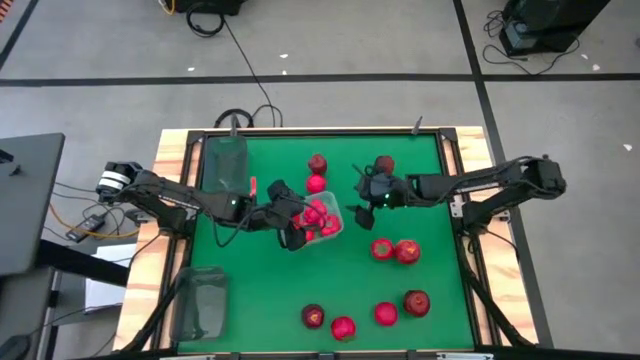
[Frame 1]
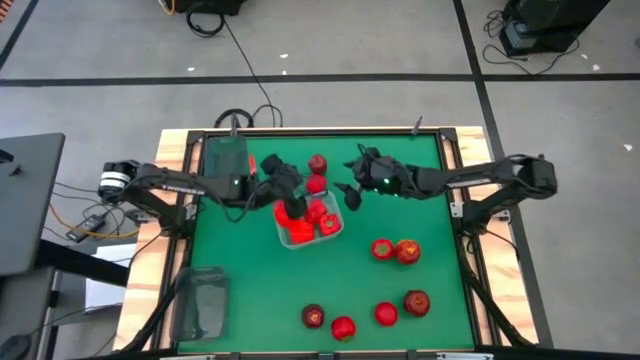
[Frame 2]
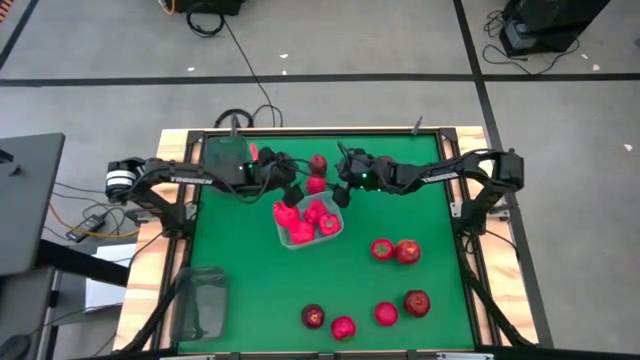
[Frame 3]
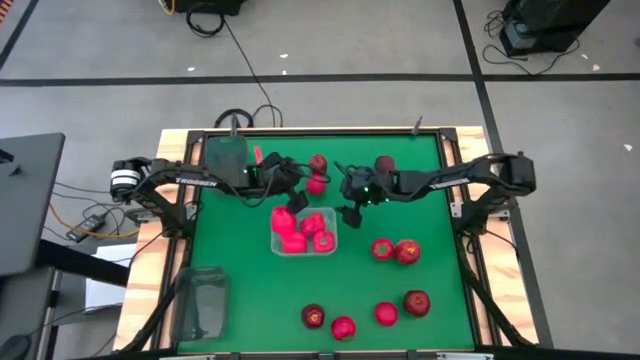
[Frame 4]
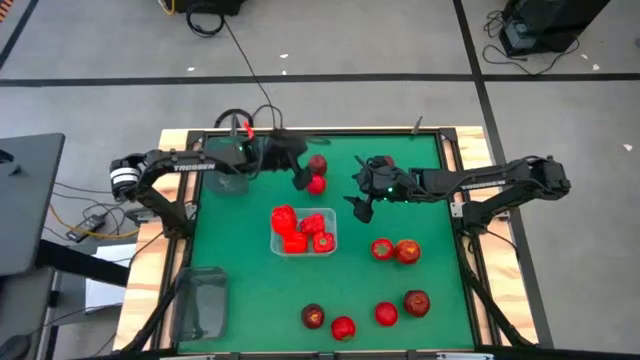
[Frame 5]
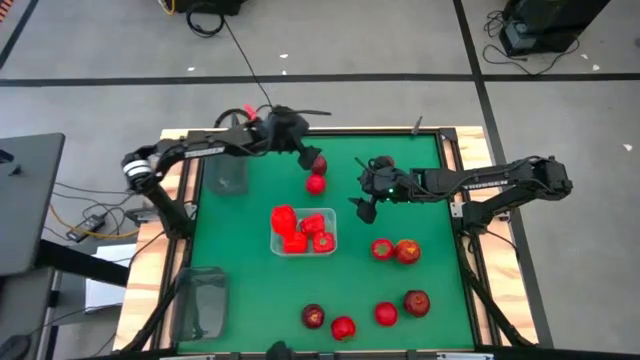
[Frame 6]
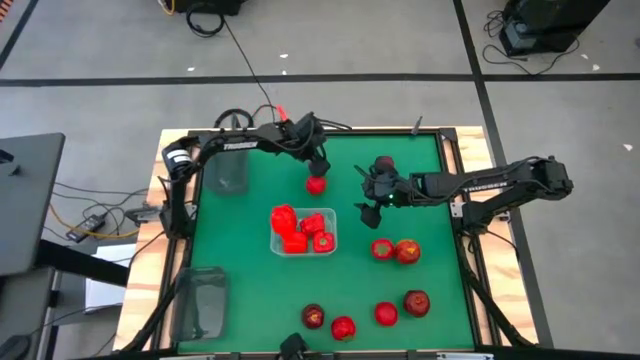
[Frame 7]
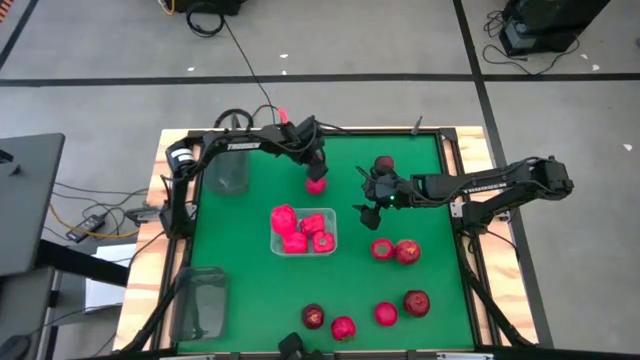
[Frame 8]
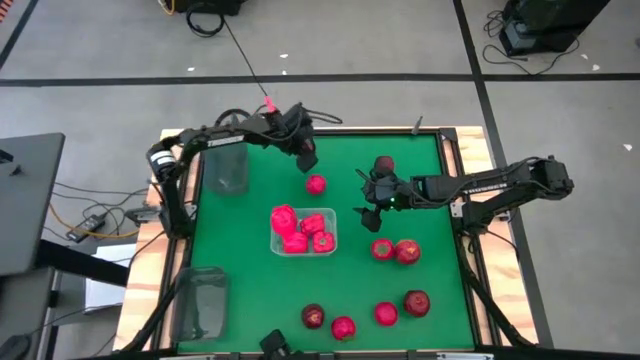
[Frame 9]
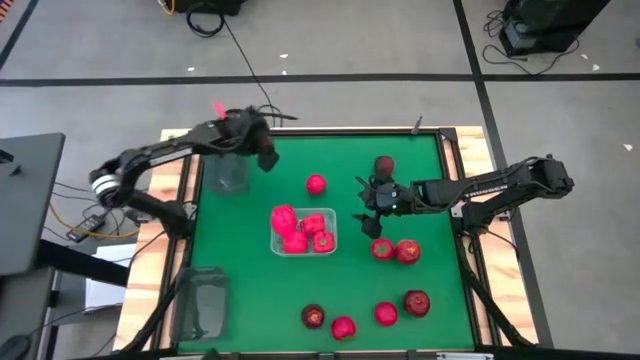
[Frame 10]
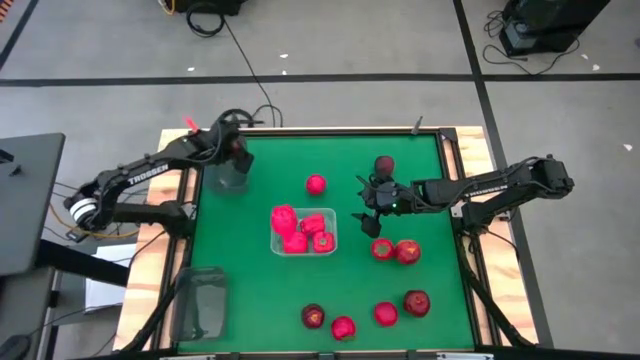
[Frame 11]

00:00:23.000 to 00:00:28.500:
Task: Sort produce into baskets
Put the red apple into the top black bin

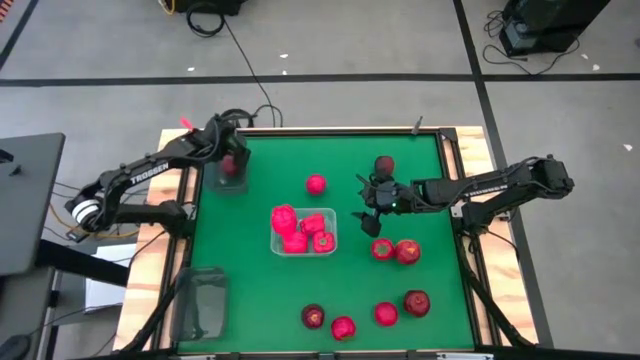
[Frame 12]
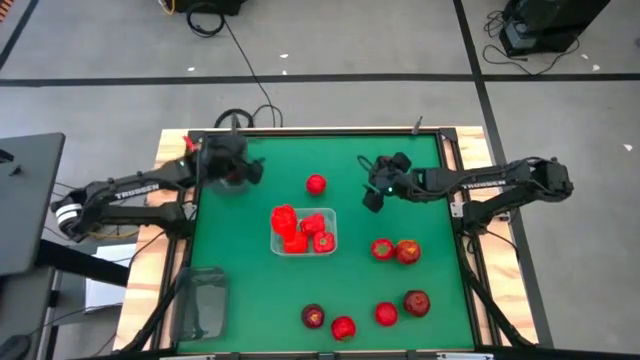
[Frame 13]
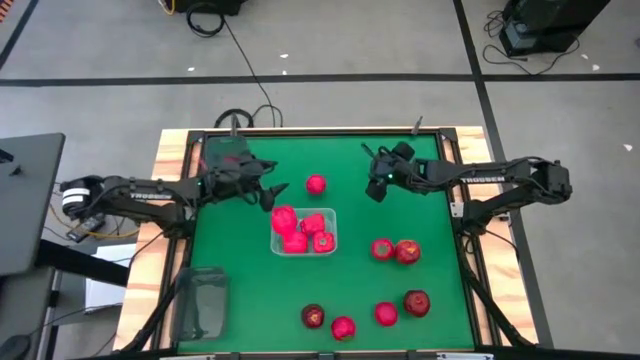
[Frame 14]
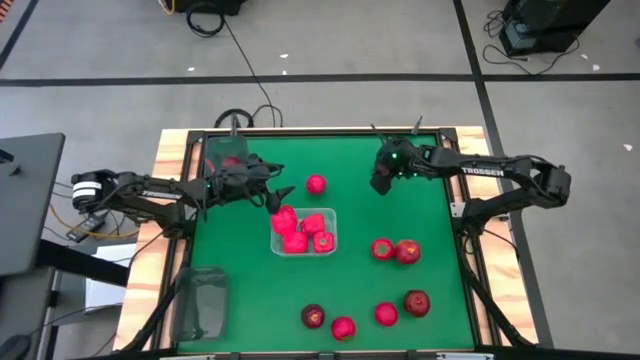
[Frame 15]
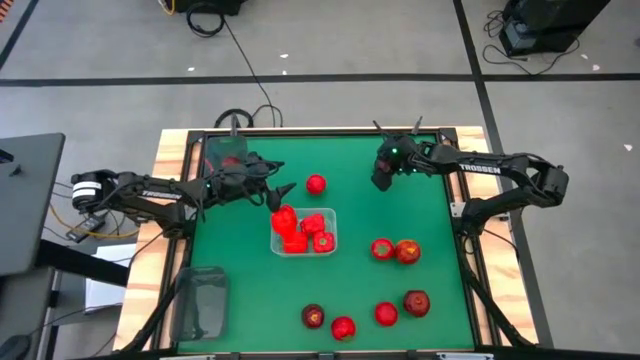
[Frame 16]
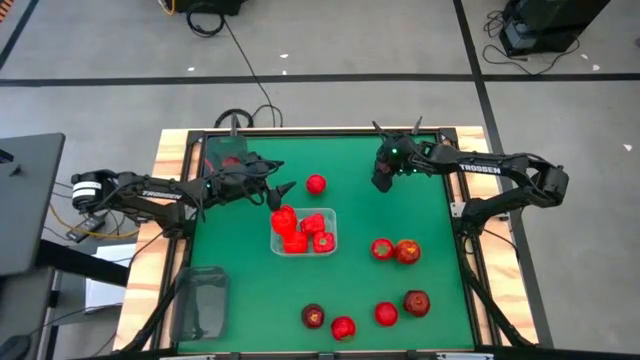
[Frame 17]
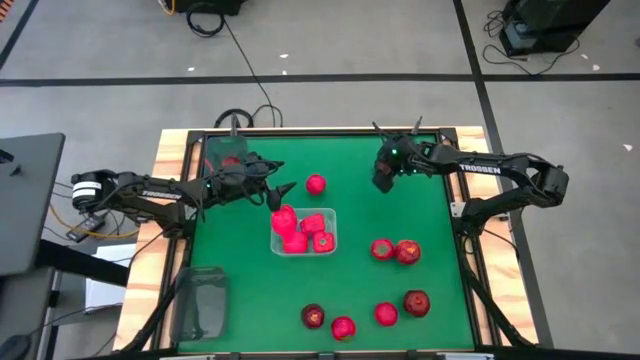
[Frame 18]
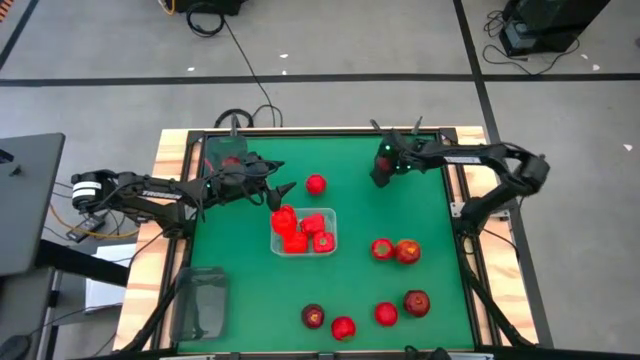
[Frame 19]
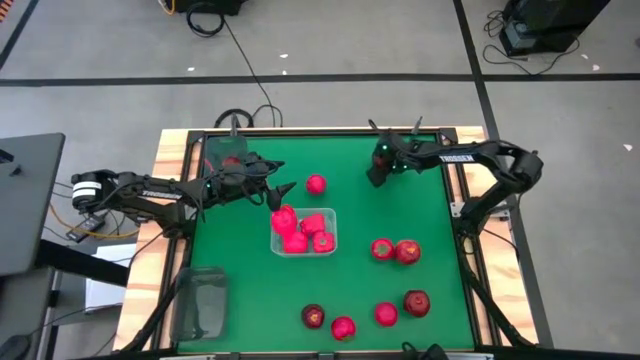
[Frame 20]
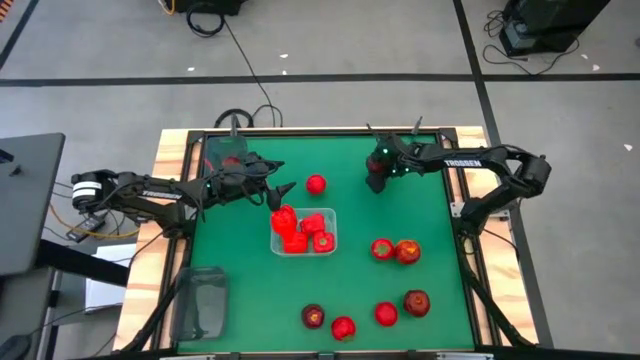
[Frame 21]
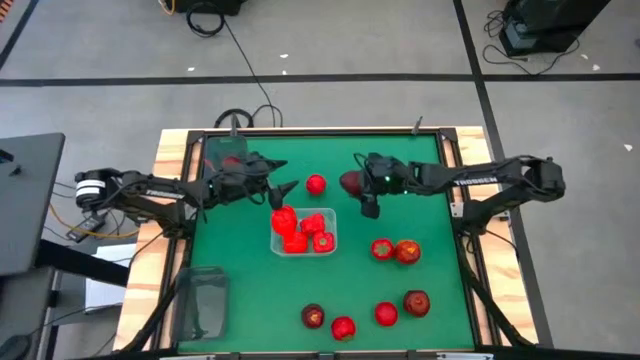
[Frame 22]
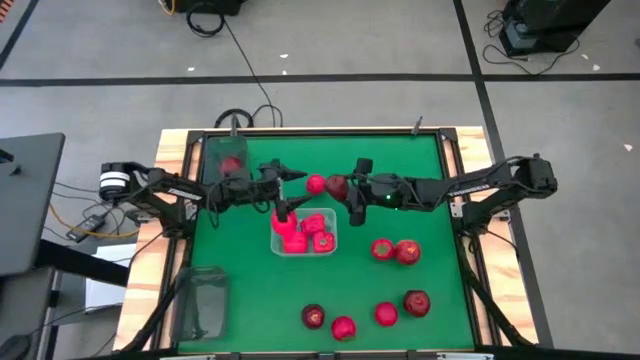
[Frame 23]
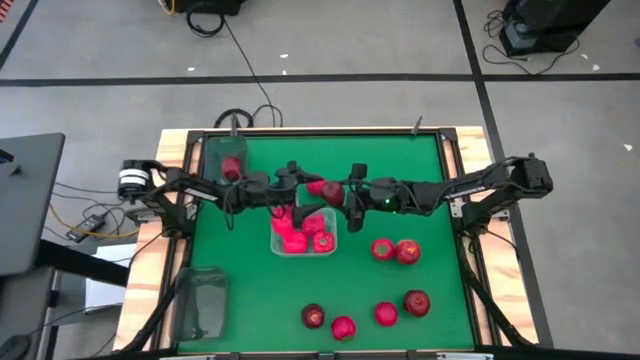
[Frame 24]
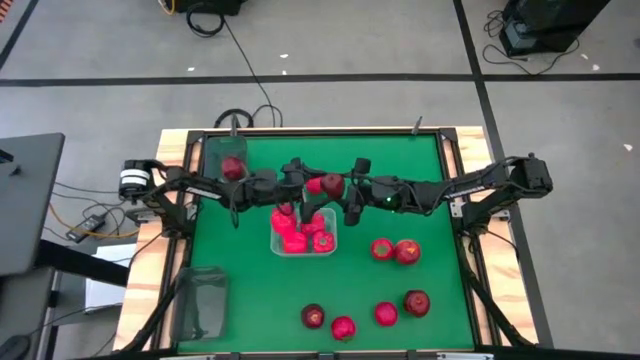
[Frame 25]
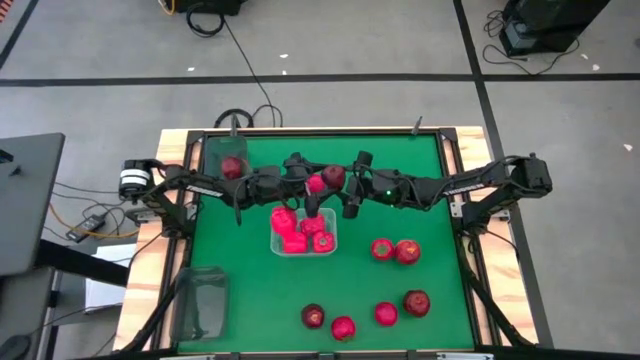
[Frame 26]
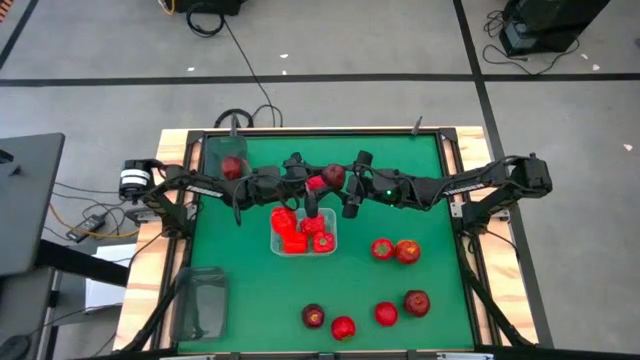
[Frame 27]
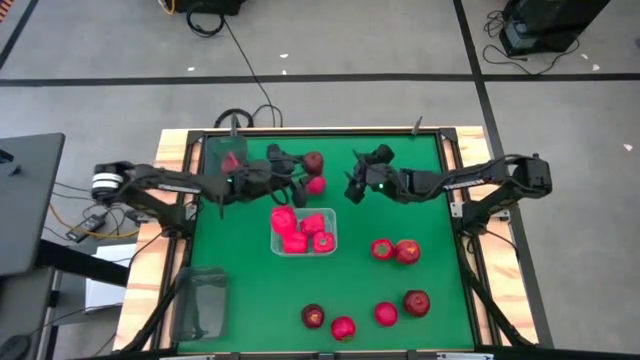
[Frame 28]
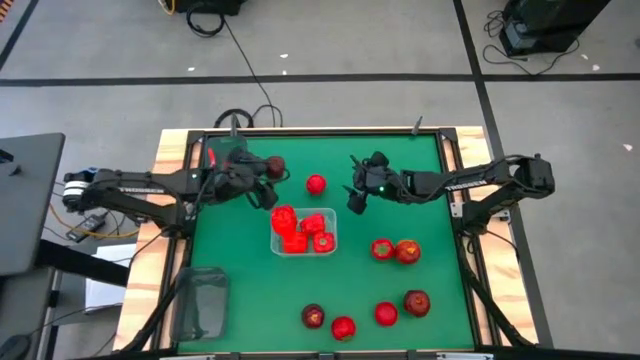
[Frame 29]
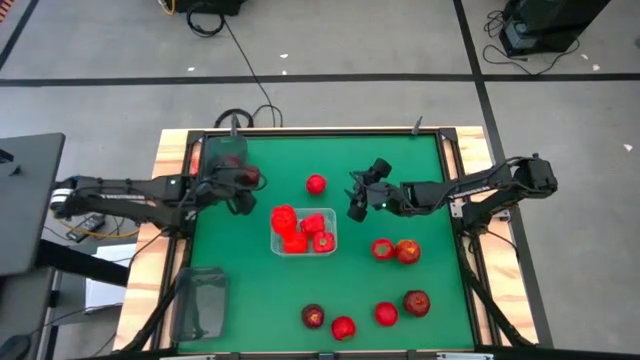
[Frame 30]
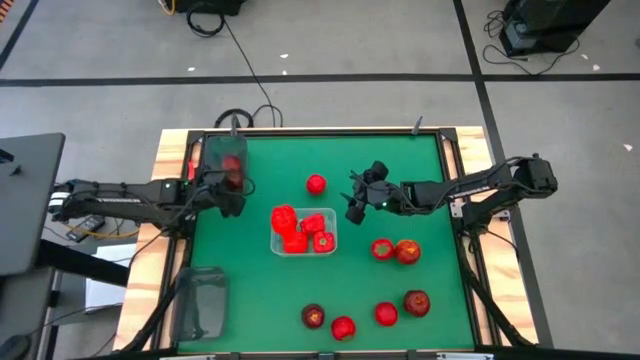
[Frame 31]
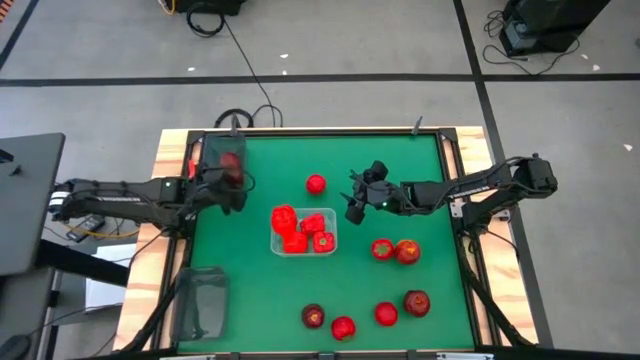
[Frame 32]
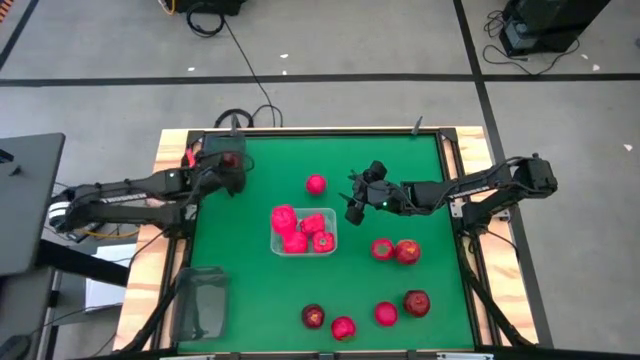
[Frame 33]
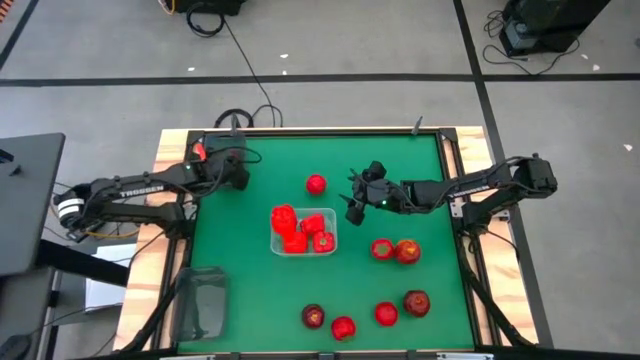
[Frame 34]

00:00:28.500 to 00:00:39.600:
Put the red apple into the top black bin

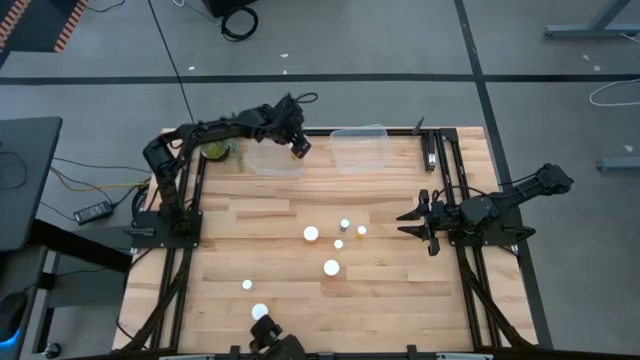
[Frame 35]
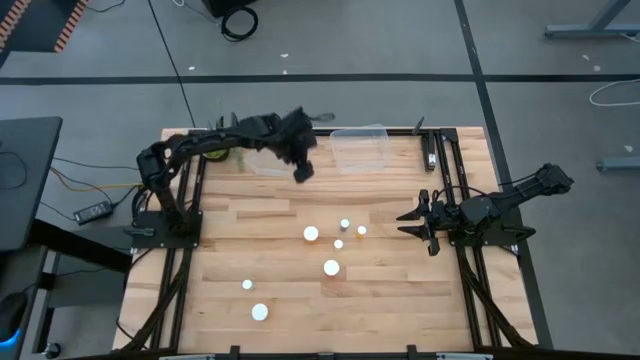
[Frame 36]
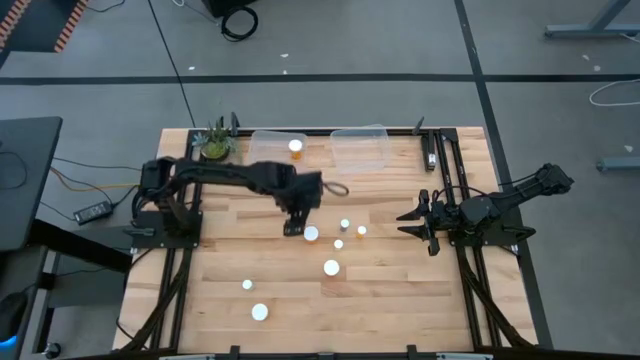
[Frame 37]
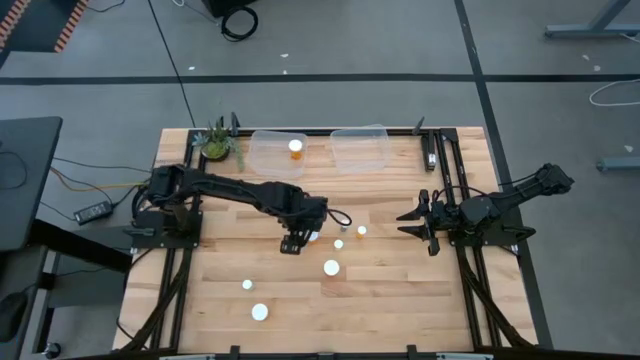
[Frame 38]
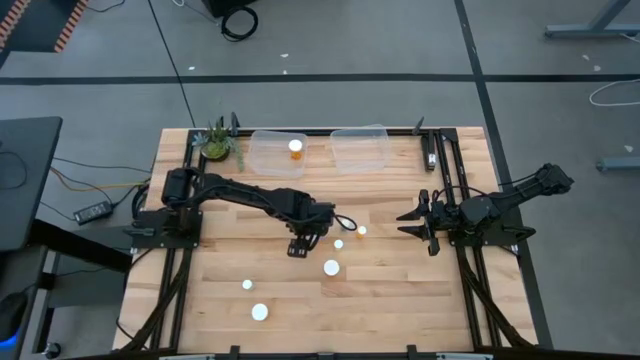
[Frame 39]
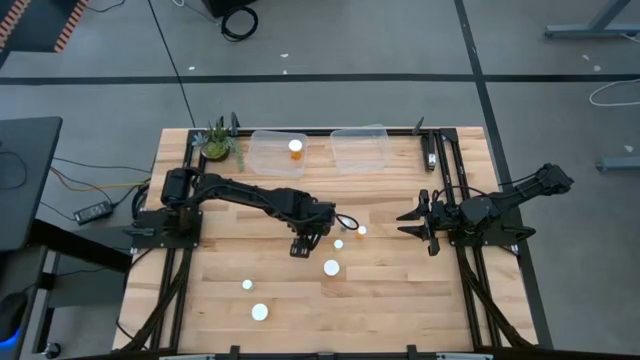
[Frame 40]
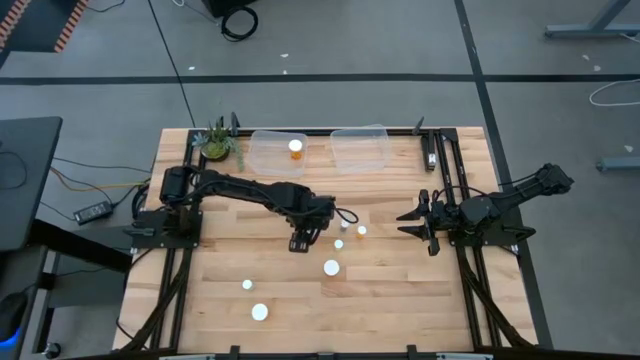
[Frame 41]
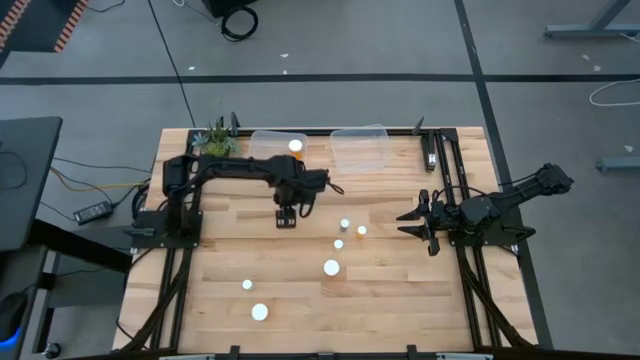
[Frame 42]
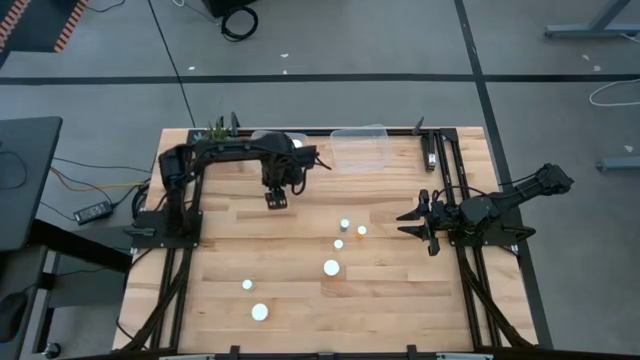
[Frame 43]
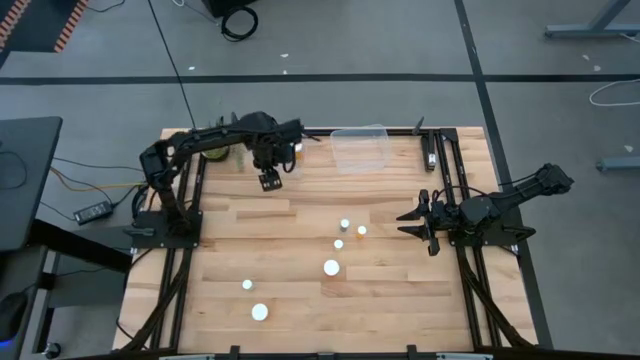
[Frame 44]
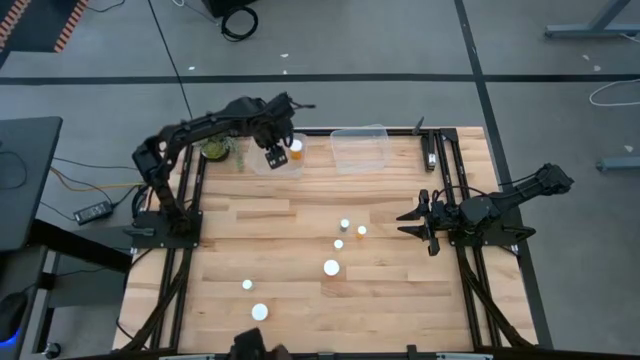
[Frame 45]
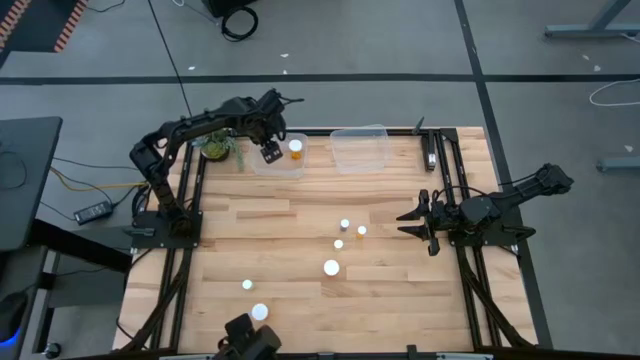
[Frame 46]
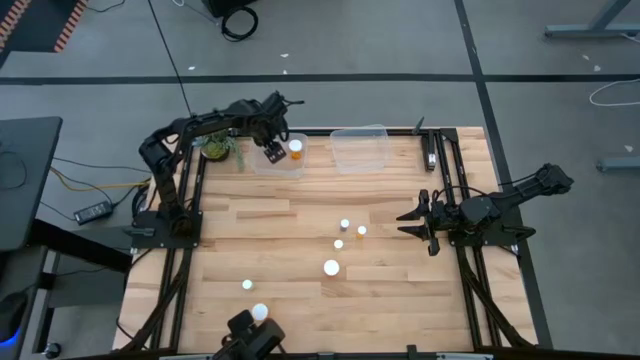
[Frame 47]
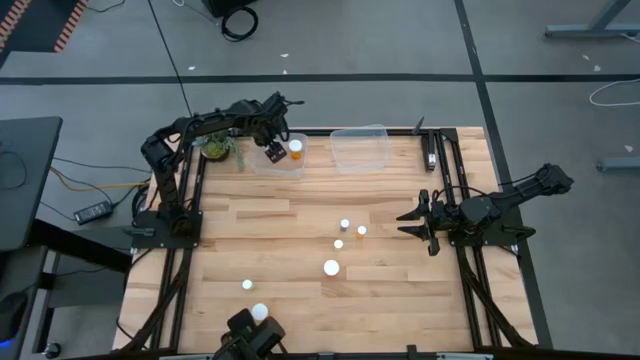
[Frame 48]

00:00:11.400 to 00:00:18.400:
Task: Pick and place medicine bottles into bin by pill shape (circle, oval)
Put the top large orange pill bottle into the left bin
